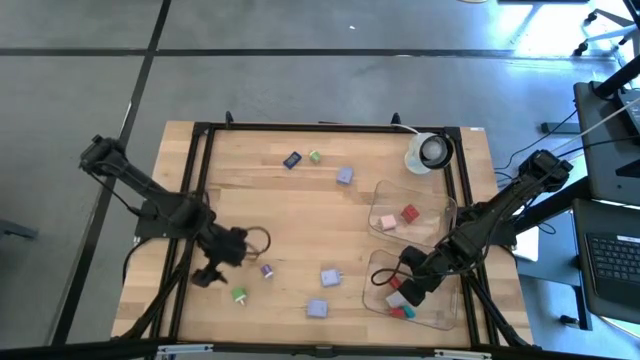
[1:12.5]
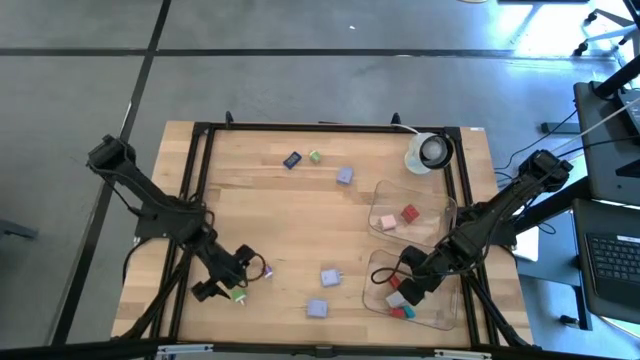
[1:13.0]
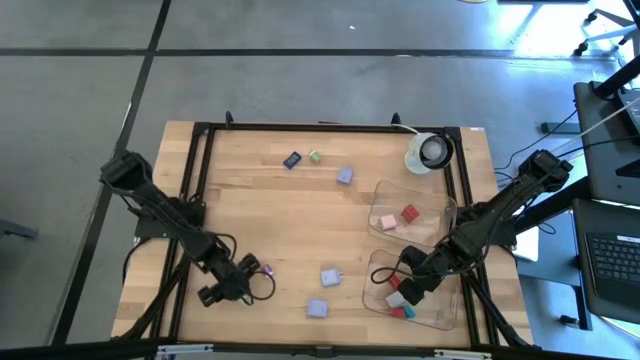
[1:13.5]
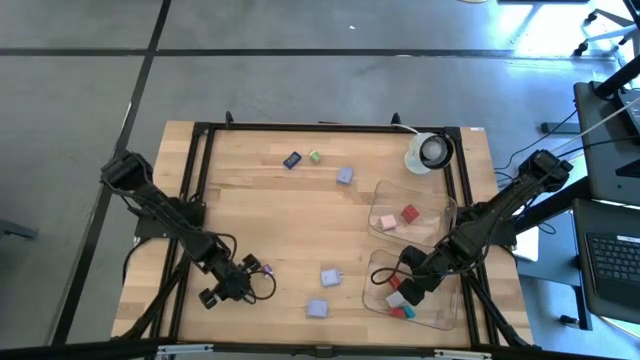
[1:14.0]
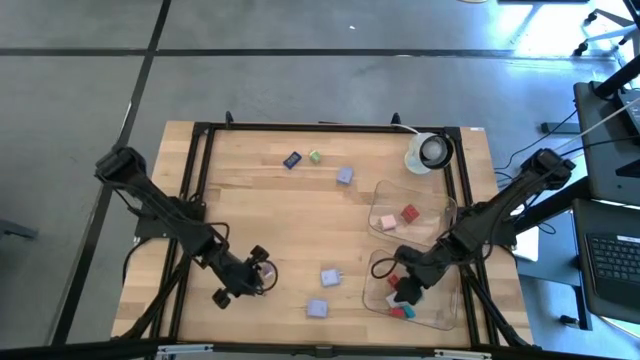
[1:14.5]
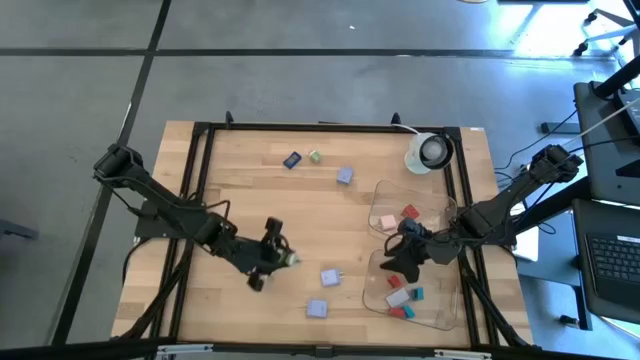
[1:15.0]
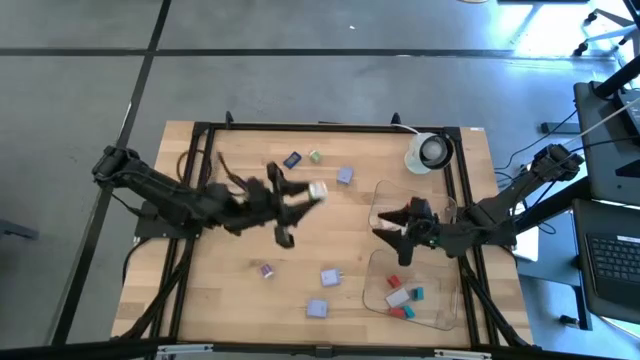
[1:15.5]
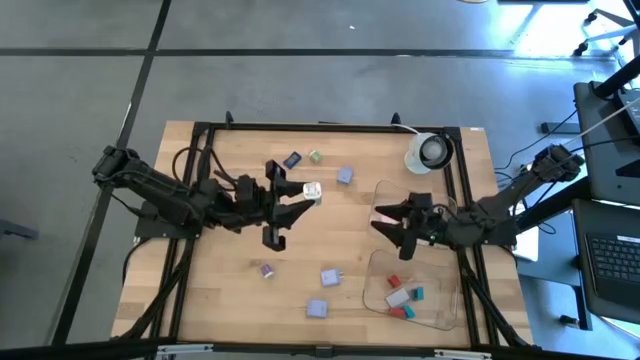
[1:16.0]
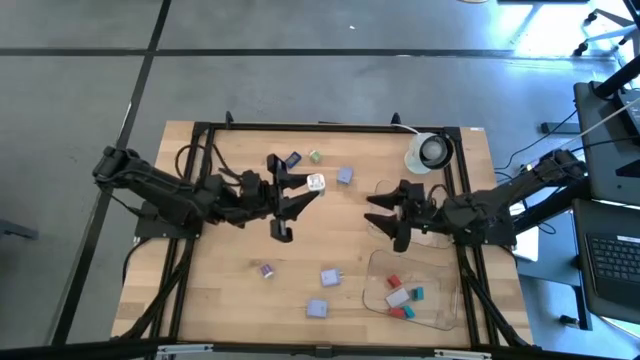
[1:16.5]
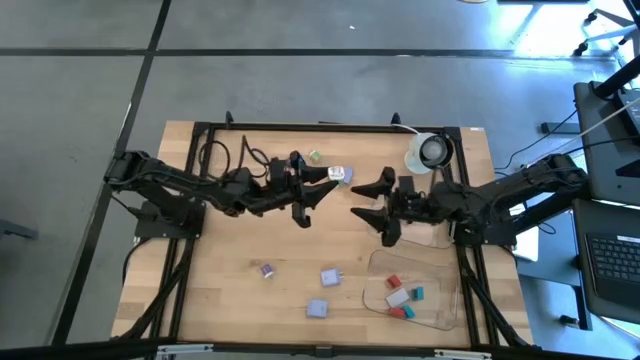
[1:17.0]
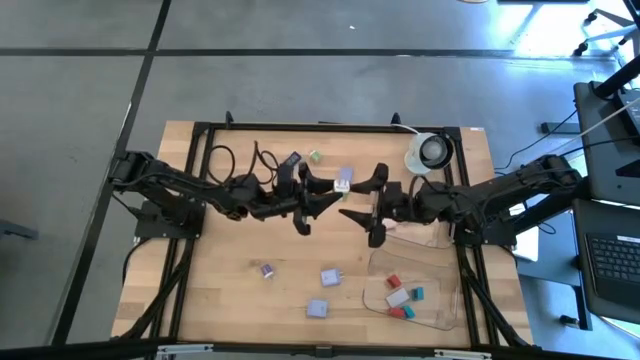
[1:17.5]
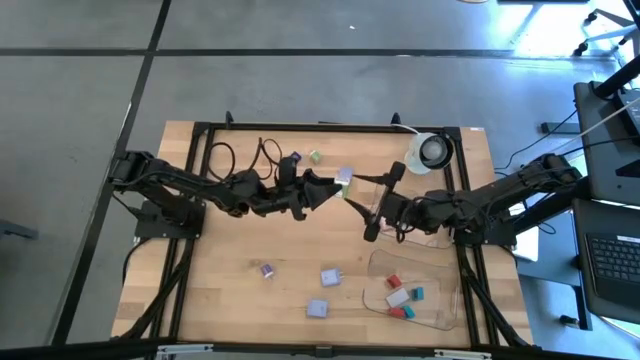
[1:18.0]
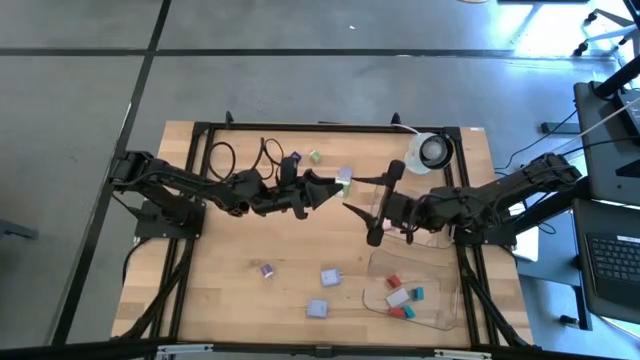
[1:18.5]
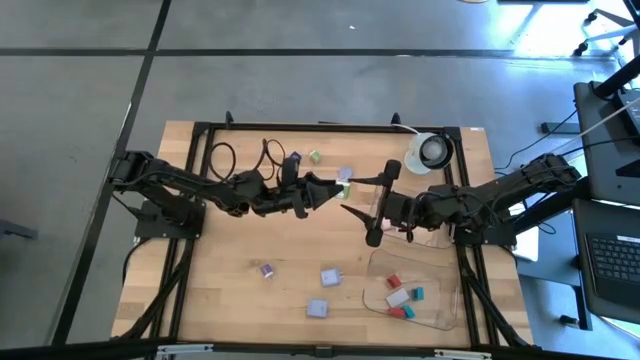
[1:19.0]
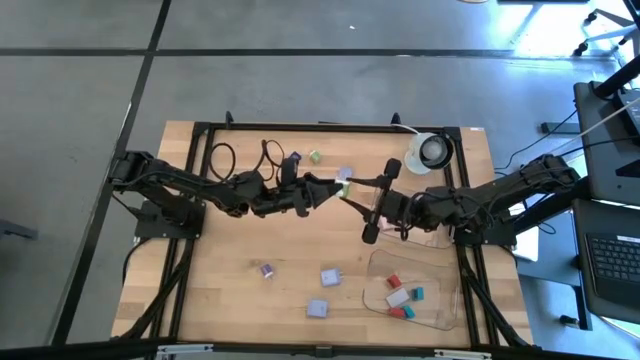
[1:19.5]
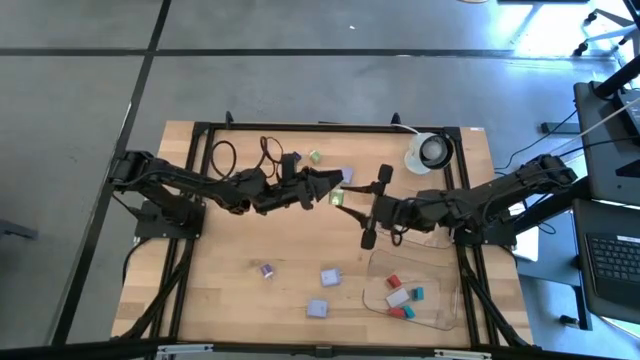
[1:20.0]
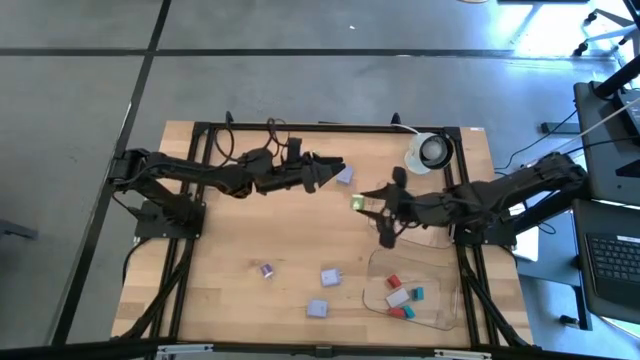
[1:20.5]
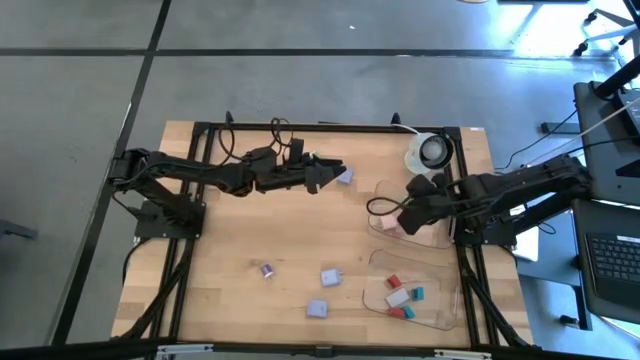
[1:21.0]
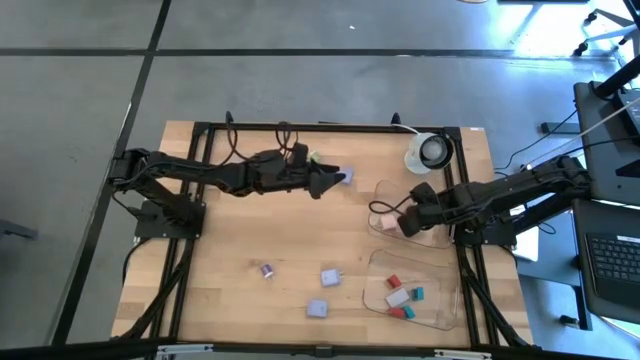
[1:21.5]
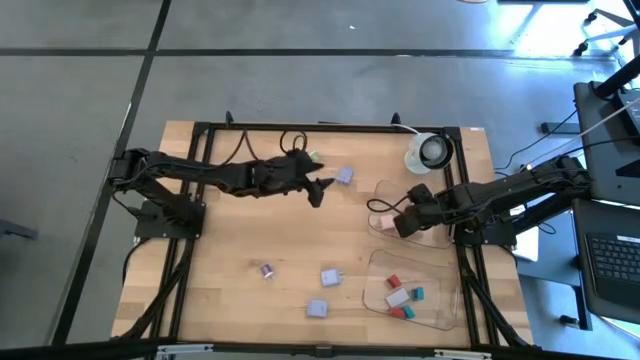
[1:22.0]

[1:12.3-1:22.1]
Task: Pick & Place Office items
Put the bottom green charger adapter into the top transparent bin

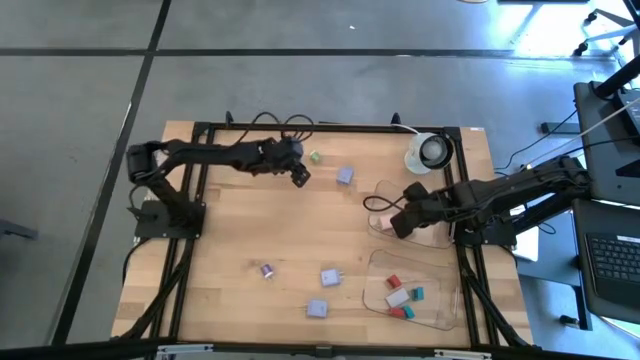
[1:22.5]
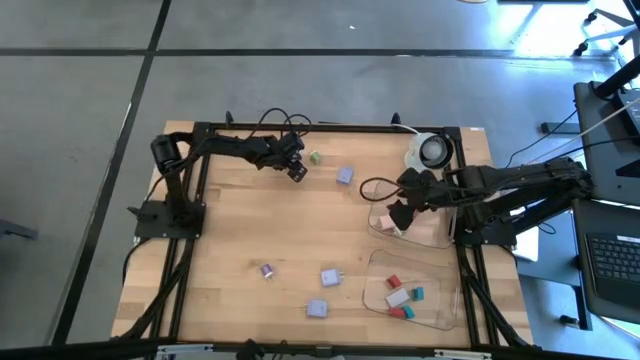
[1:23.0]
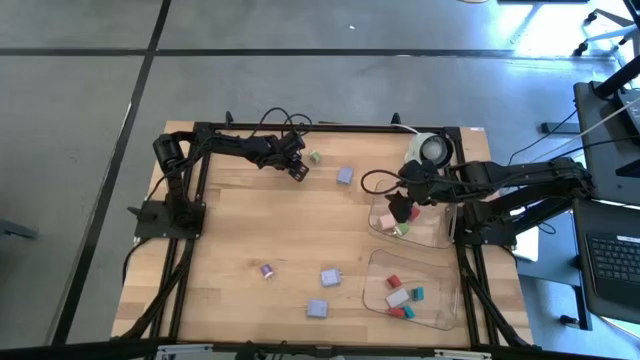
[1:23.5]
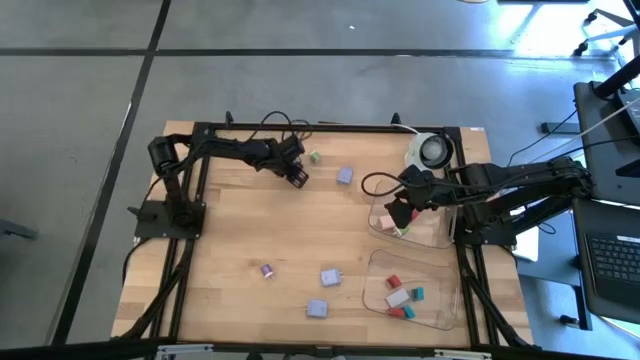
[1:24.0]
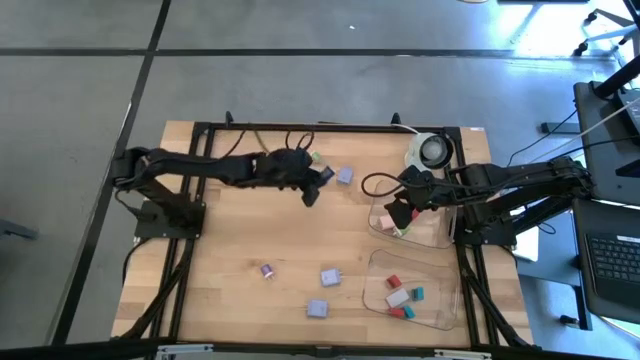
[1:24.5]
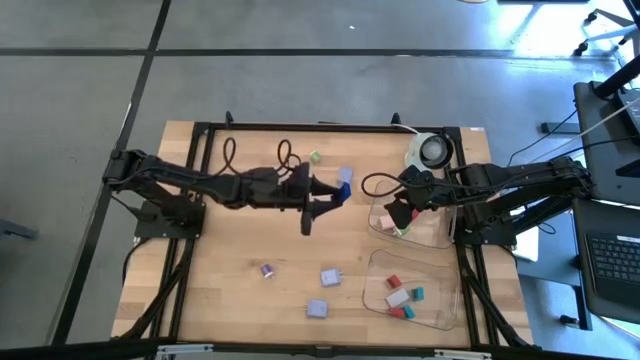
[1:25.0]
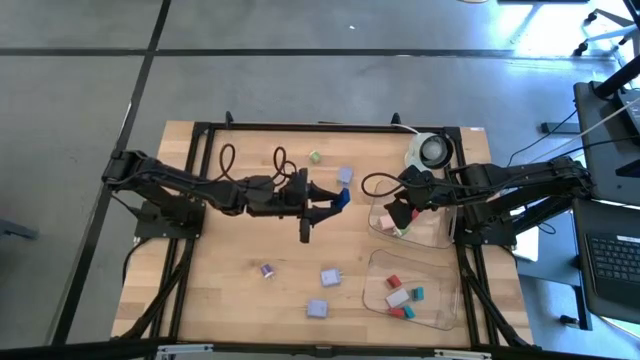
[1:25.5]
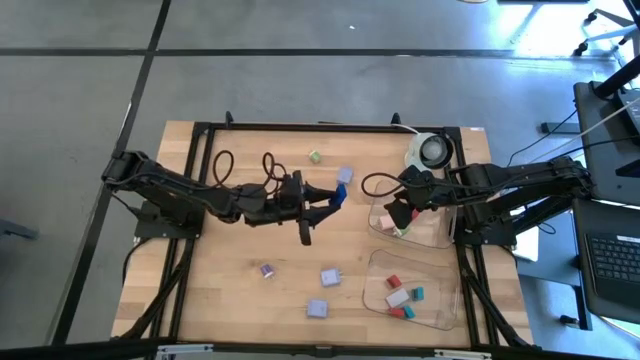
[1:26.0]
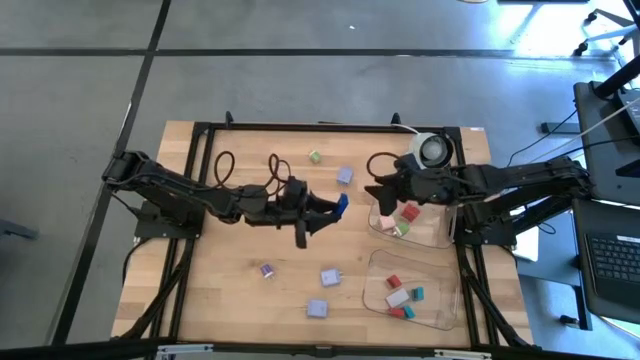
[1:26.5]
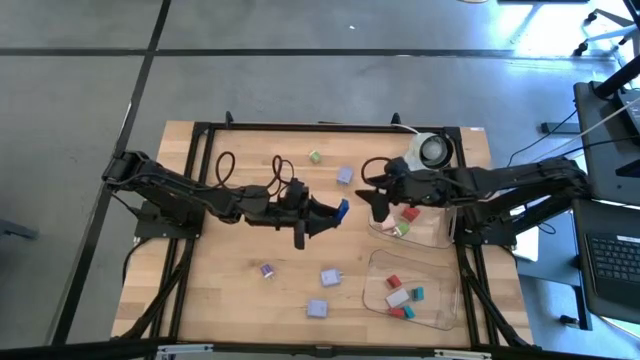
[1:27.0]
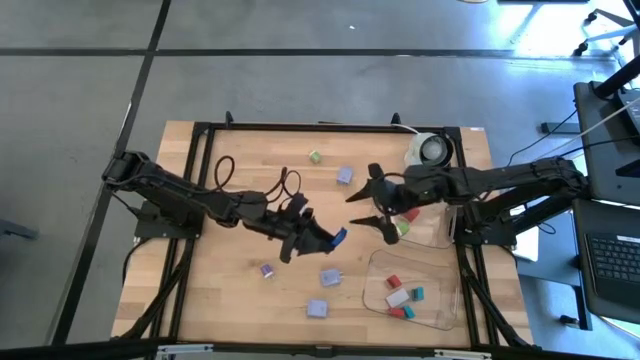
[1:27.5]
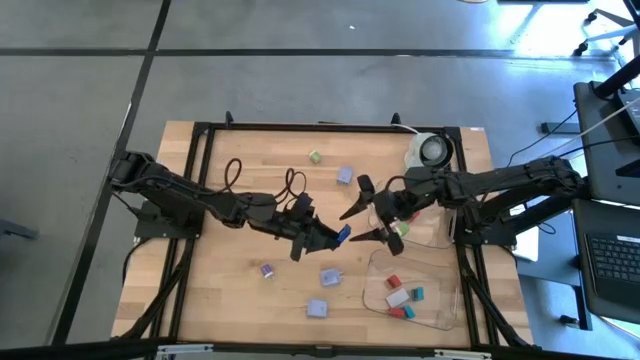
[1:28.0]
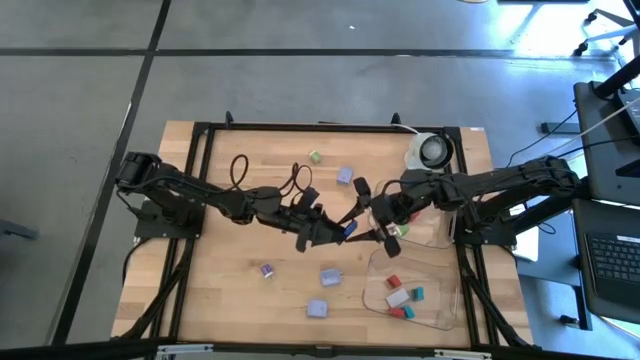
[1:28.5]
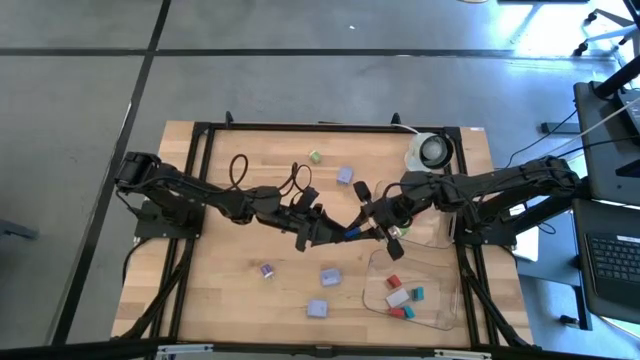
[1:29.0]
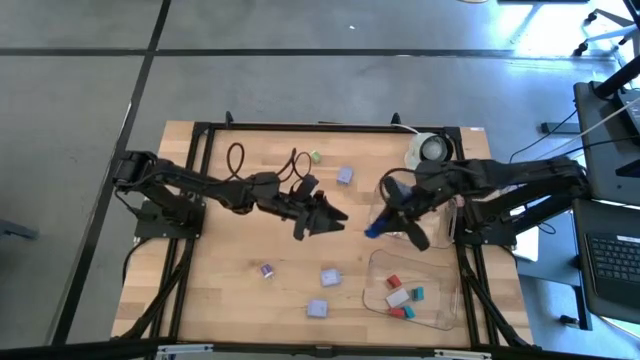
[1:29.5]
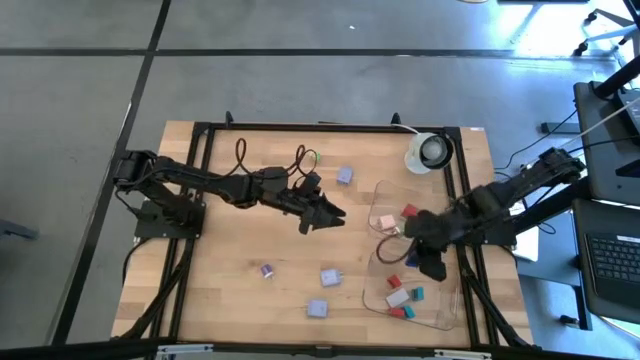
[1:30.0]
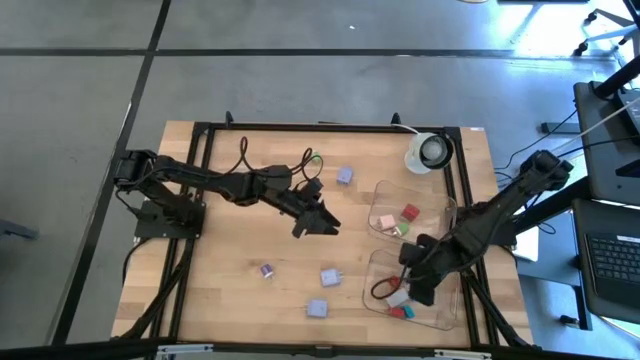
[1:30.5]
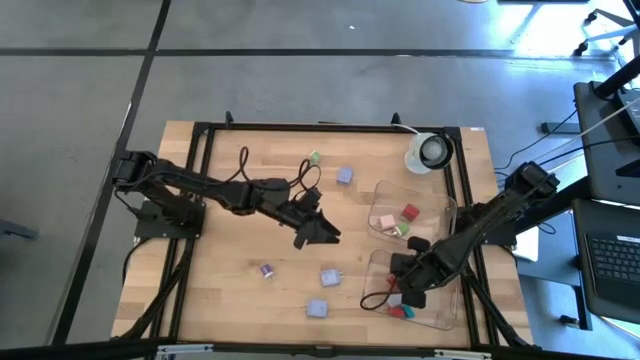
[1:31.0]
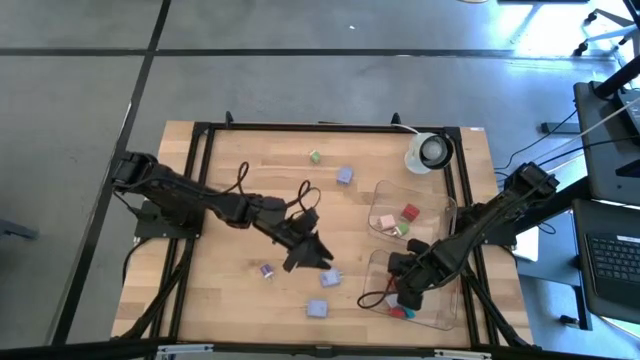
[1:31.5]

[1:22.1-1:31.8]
Put the dark blue digital timer into the bottom transparent bin
